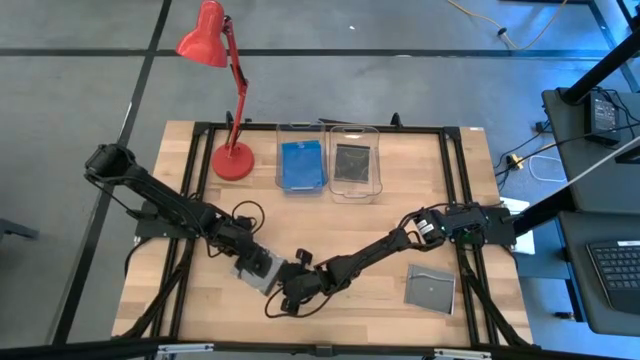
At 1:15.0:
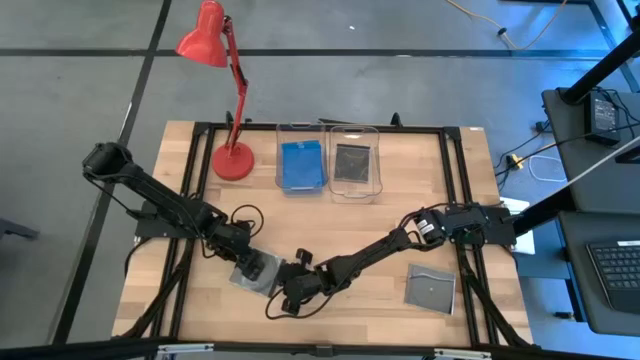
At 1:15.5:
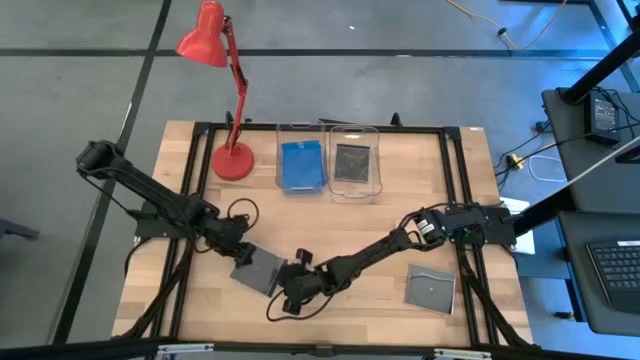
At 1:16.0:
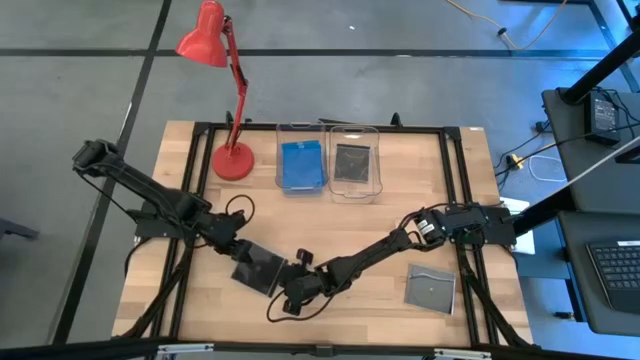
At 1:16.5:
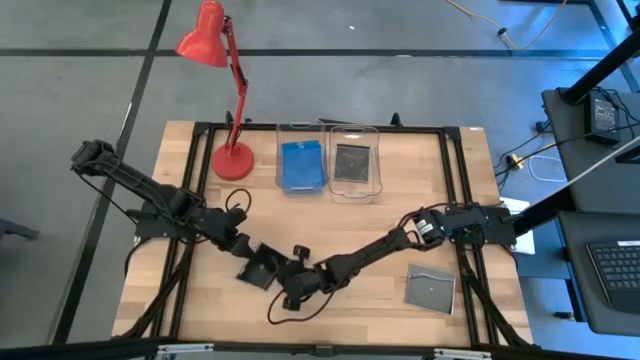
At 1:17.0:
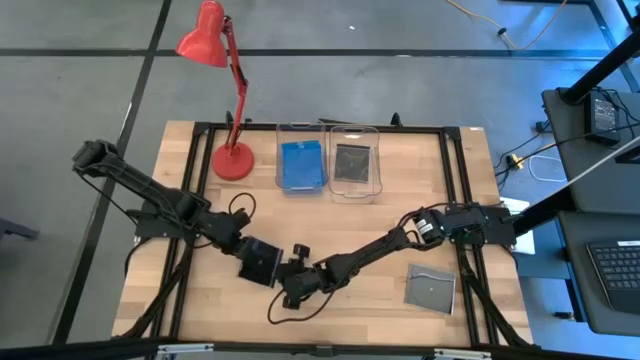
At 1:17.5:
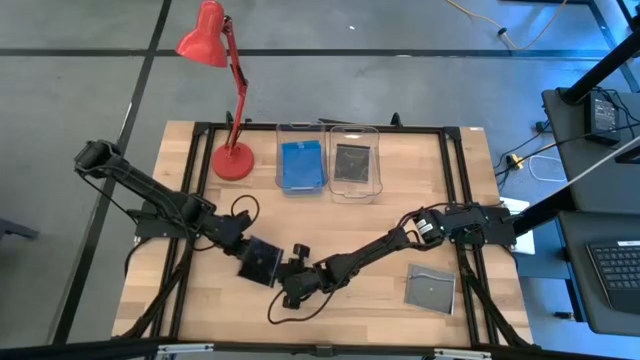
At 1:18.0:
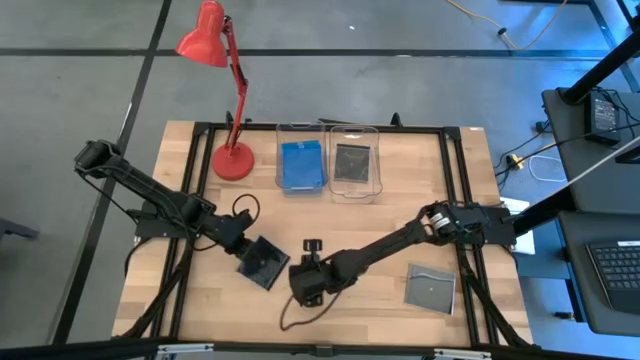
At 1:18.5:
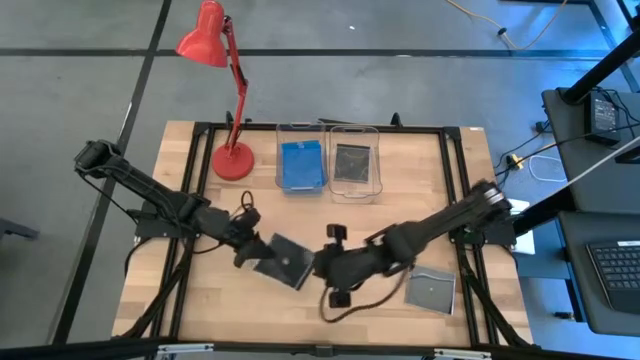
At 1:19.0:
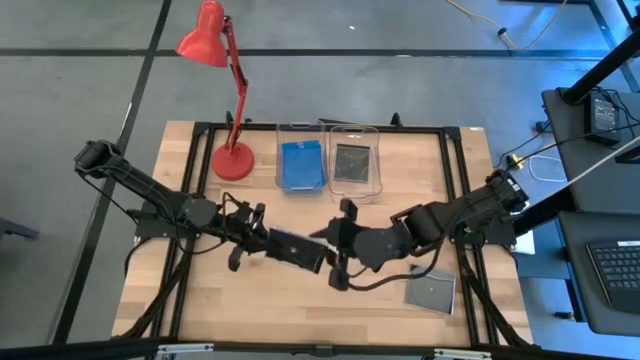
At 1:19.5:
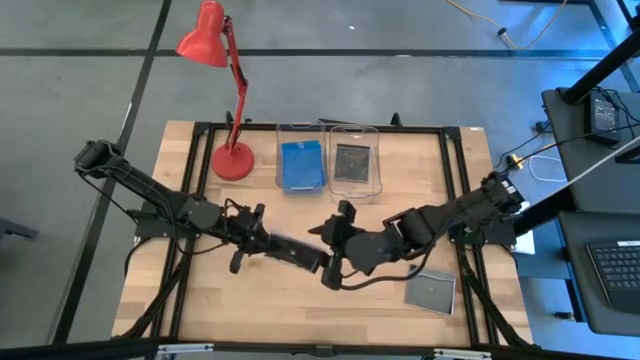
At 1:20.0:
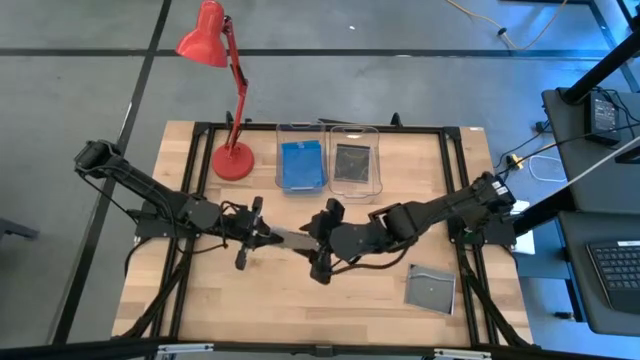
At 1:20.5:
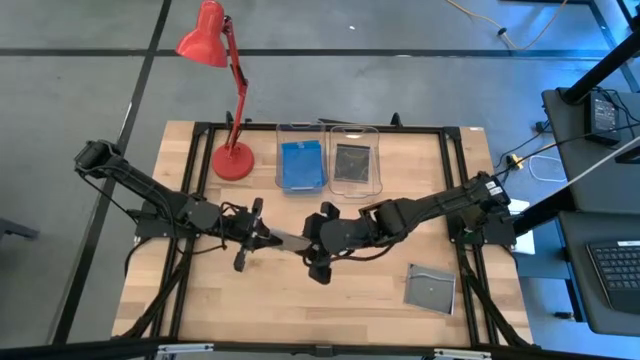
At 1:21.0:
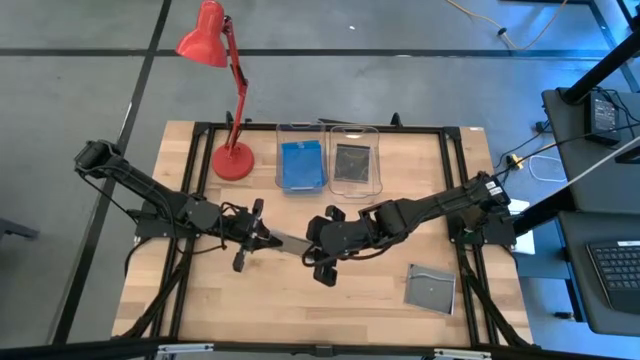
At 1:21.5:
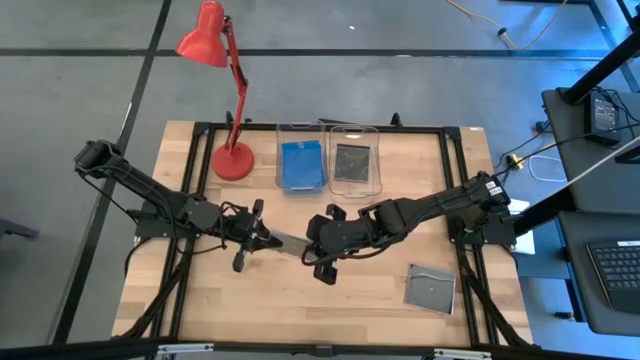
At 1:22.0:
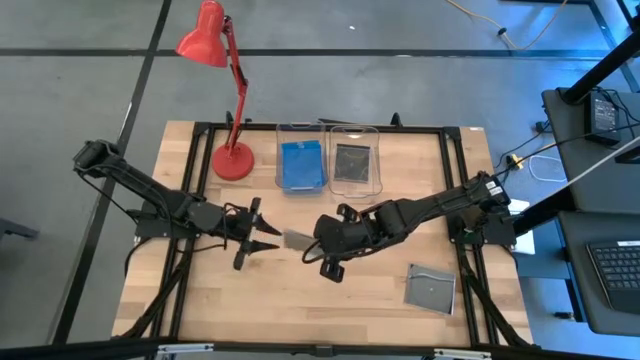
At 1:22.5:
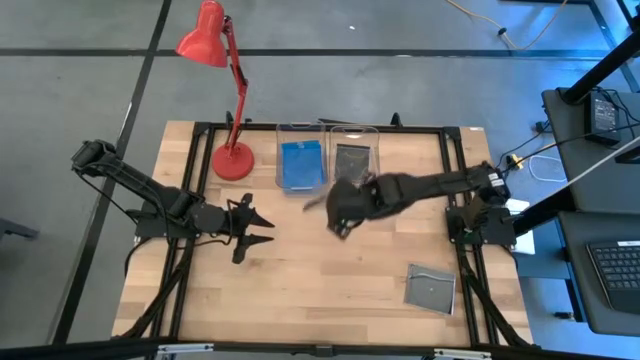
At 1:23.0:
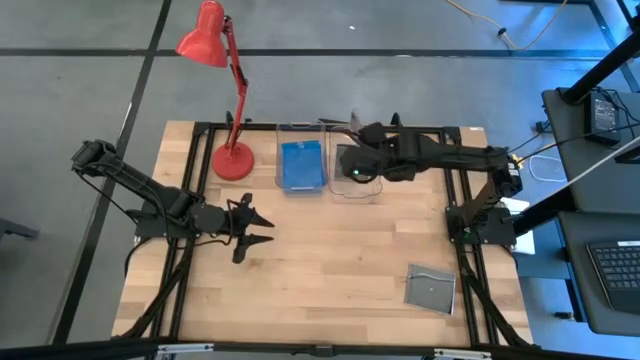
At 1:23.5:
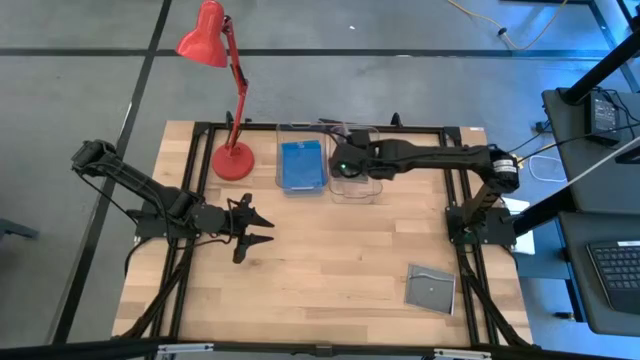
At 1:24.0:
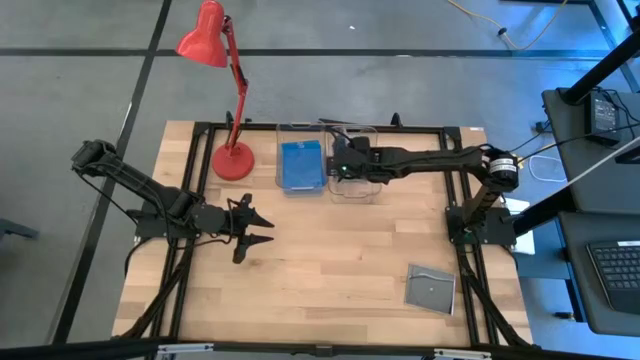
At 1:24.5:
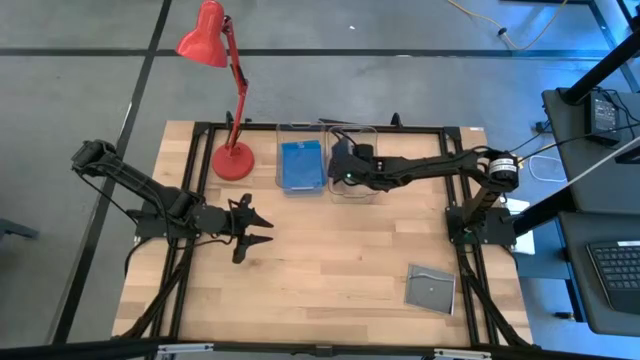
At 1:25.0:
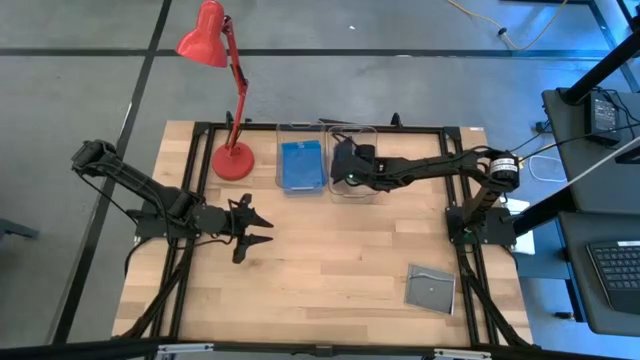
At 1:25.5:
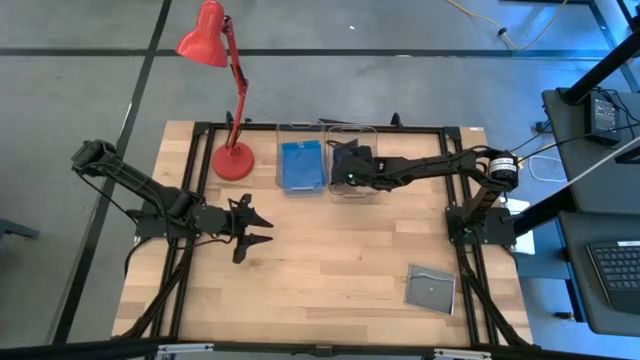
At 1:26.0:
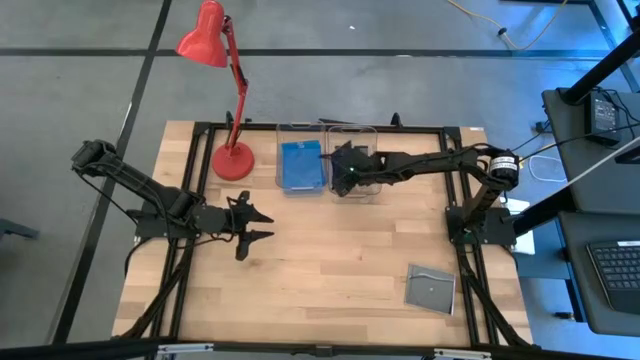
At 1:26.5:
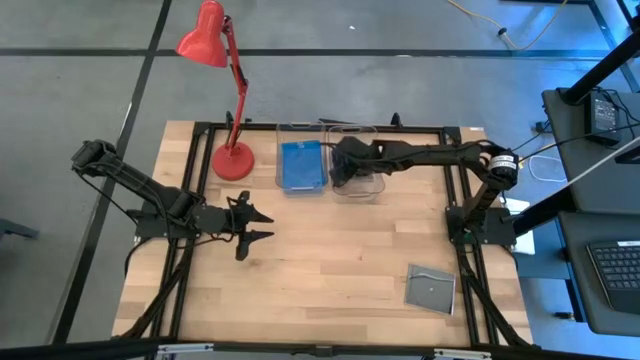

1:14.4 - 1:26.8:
Task: Pick & place jewel cases by type
Put the left black CD case into the right transparent bin

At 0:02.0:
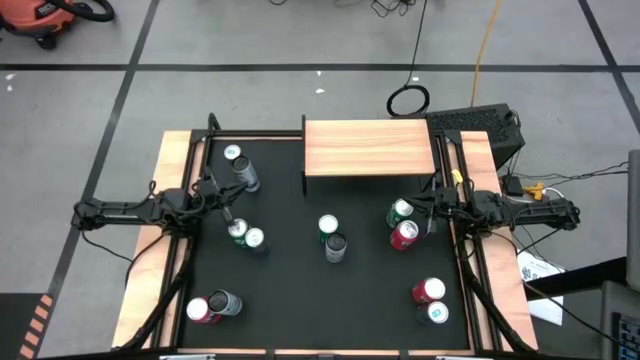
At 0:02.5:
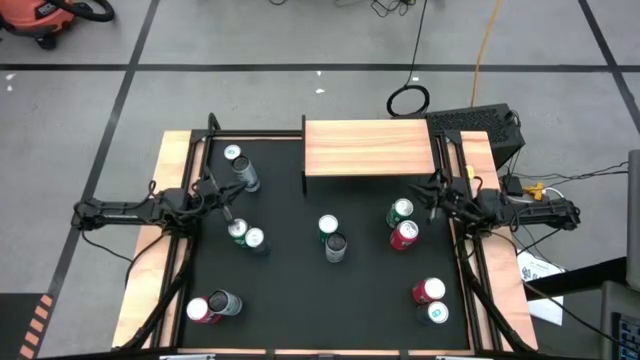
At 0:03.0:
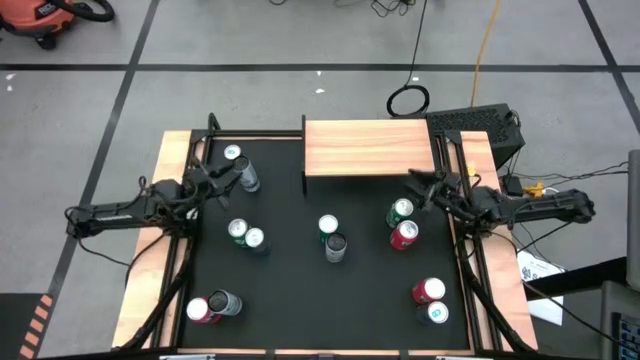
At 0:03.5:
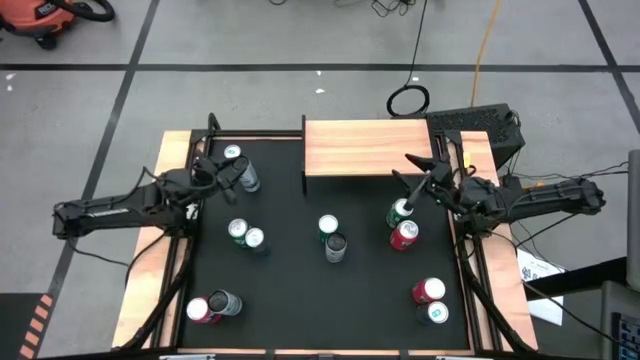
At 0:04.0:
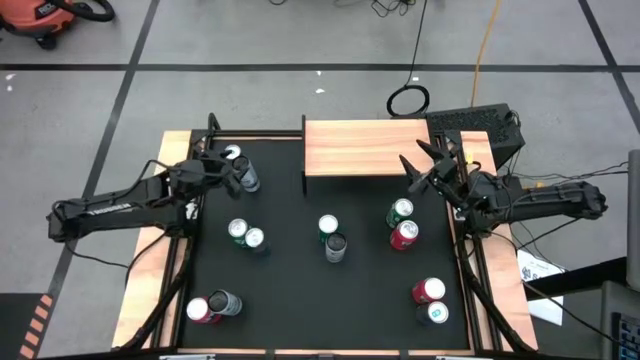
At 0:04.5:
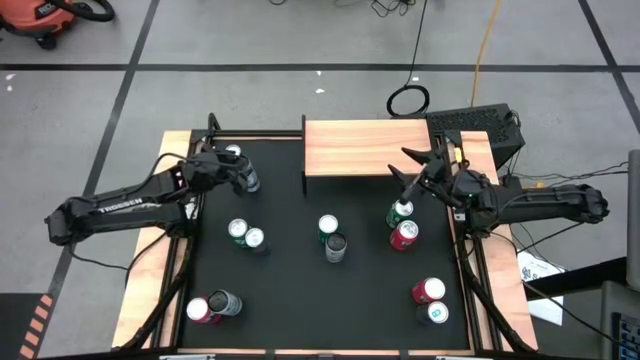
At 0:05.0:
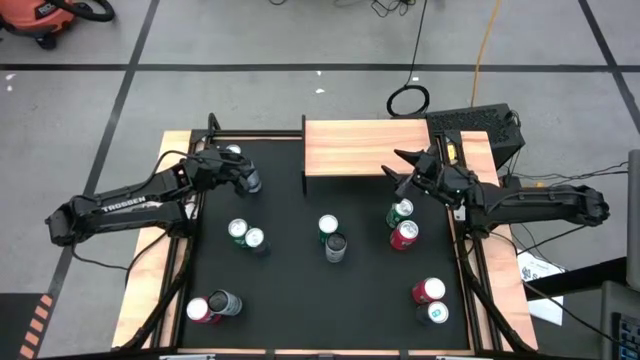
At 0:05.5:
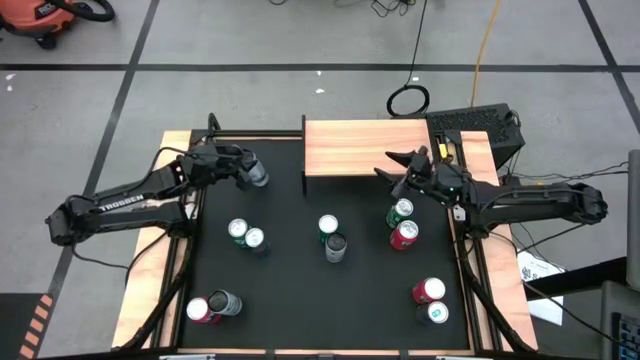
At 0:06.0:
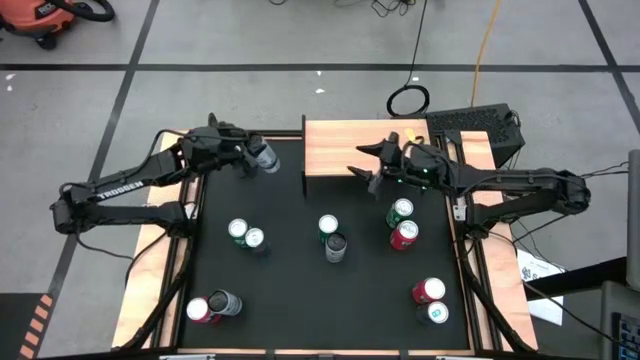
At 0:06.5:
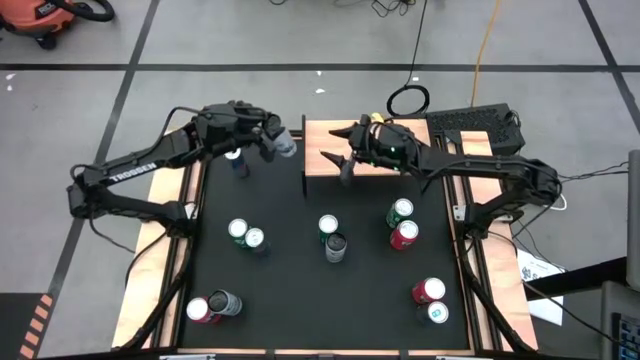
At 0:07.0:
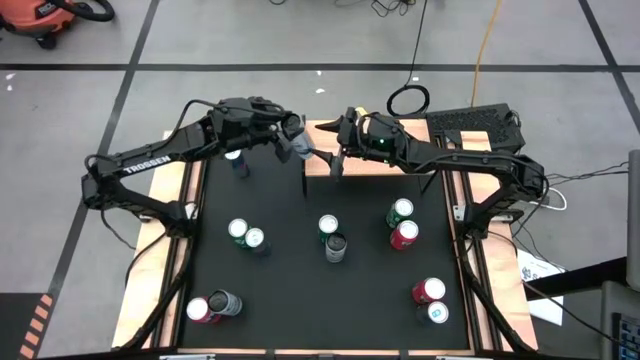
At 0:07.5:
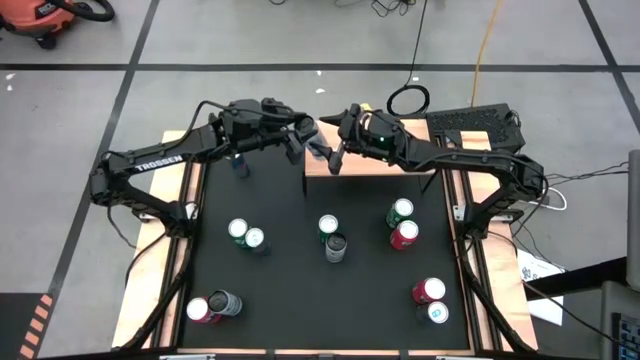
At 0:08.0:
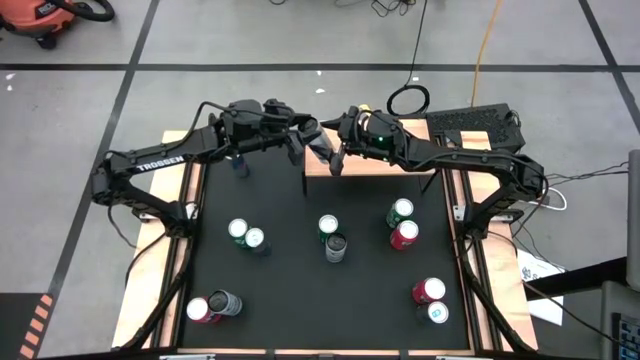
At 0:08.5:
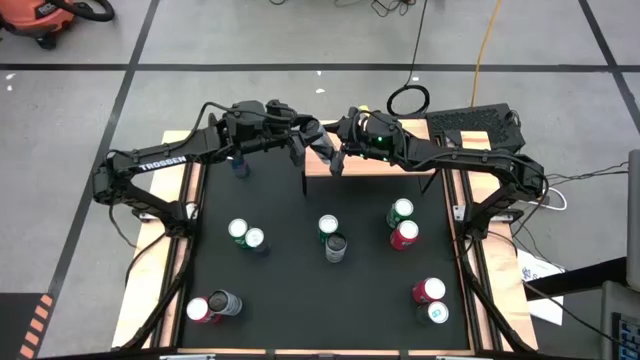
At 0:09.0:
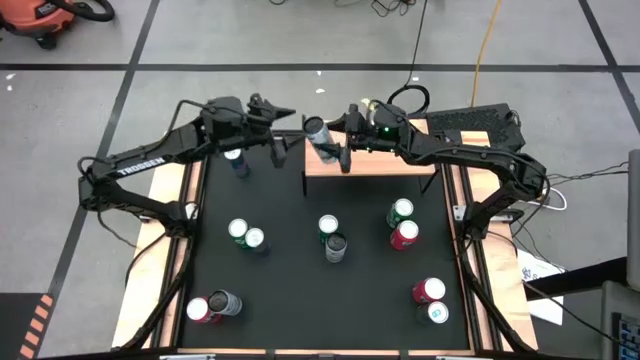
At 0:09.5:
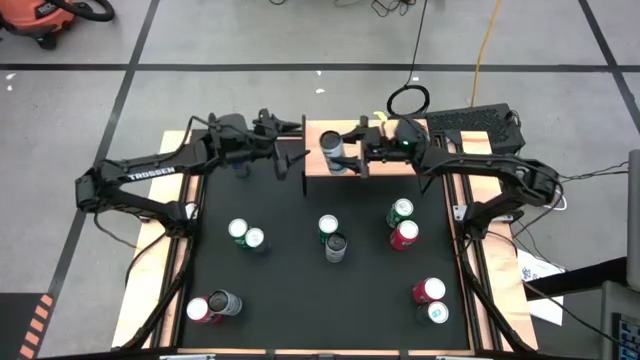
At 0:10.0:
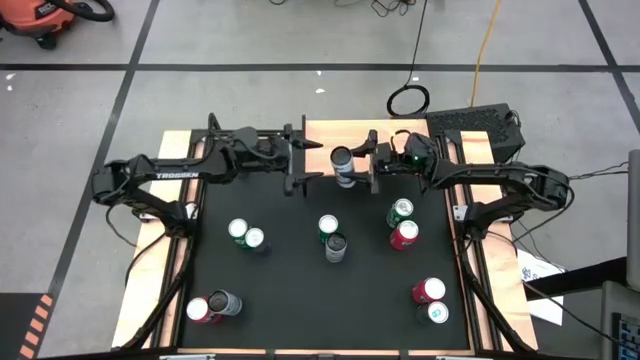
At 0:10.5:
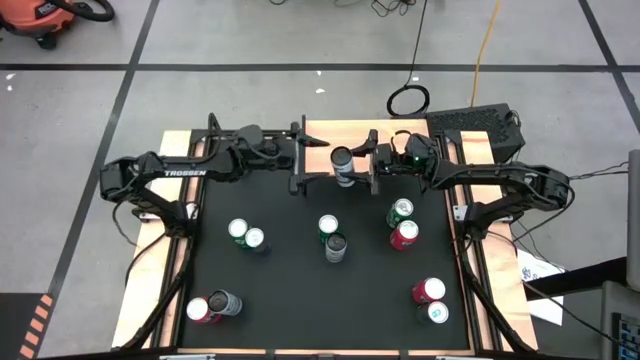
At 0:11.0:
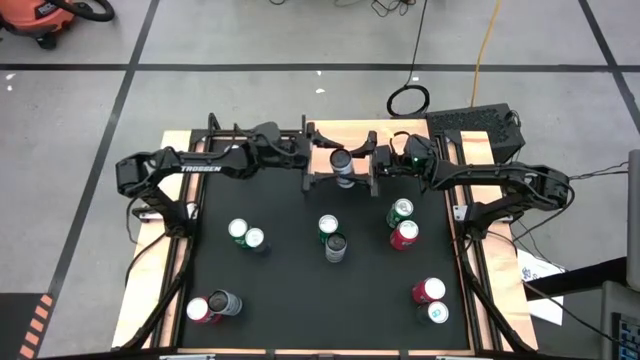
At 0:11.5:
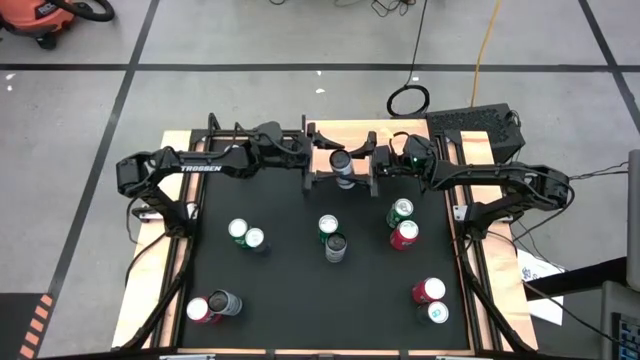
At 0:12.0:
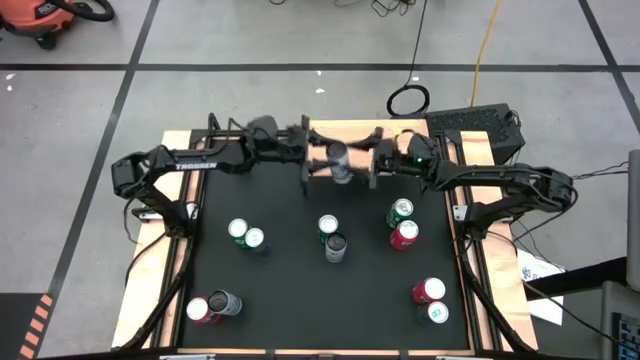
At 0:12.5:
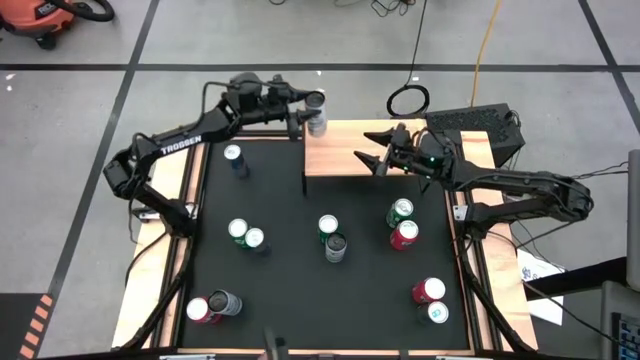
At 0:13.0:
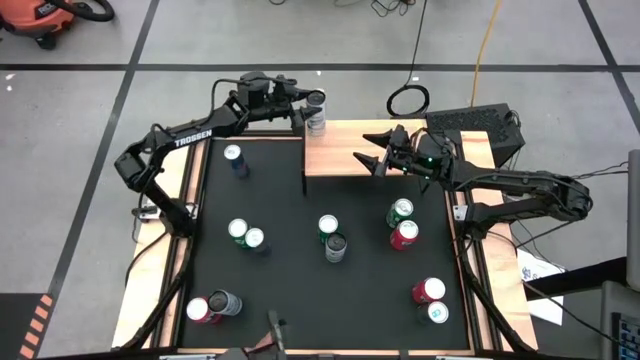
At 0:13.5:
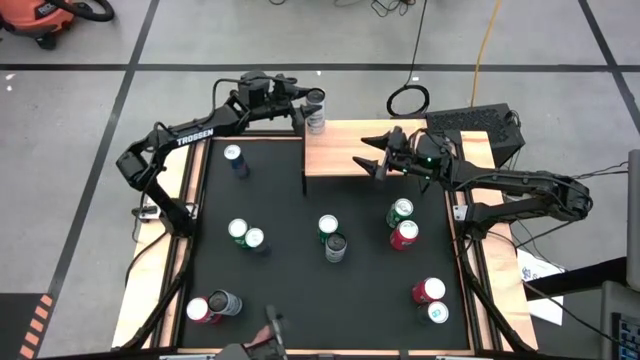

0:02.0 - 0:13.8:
Task: Place canned beverage on shelf
Put the top white blue soda can on the shelf
